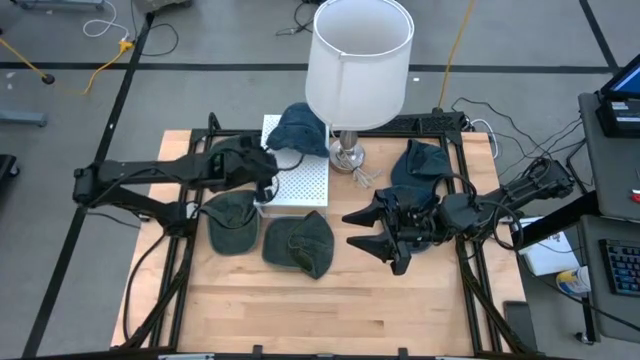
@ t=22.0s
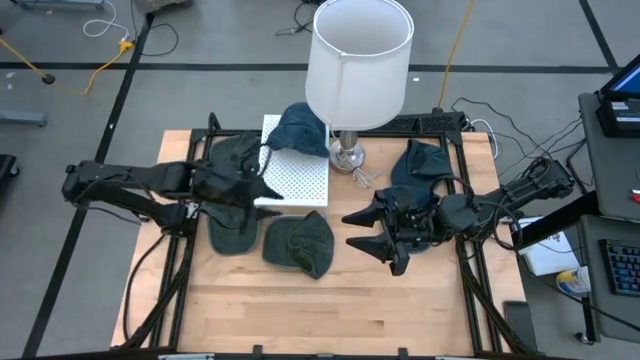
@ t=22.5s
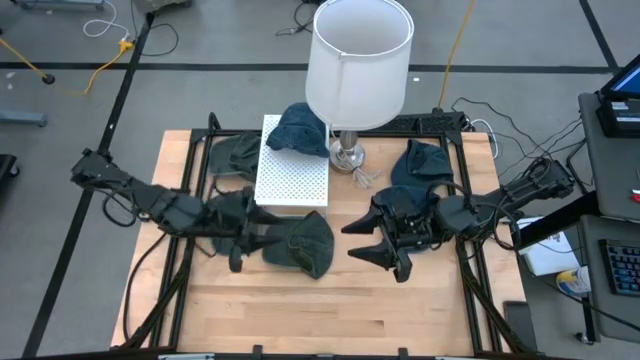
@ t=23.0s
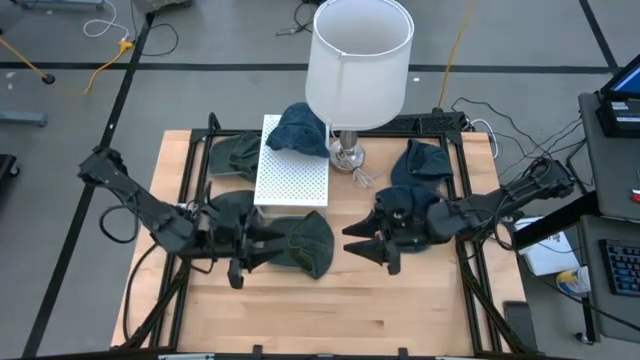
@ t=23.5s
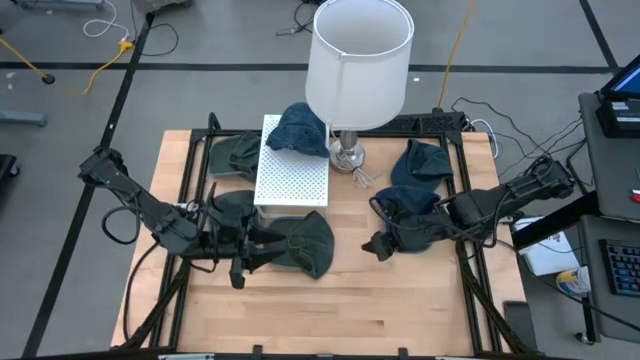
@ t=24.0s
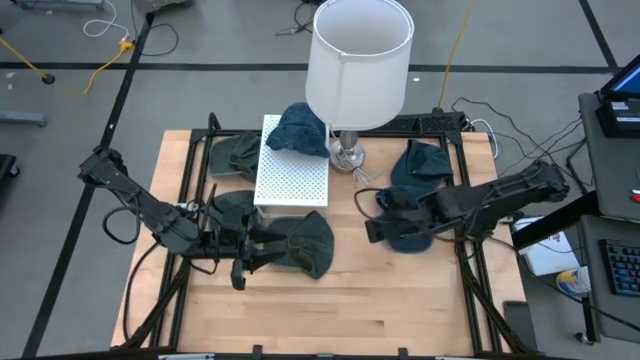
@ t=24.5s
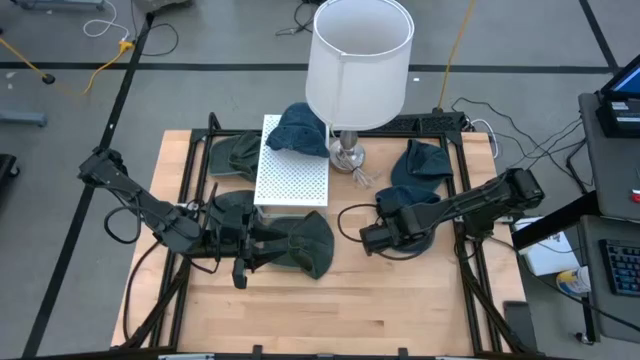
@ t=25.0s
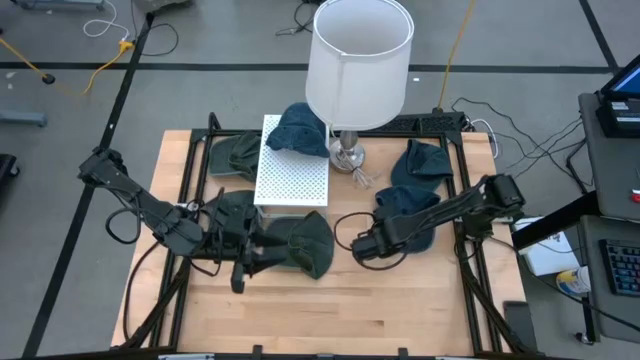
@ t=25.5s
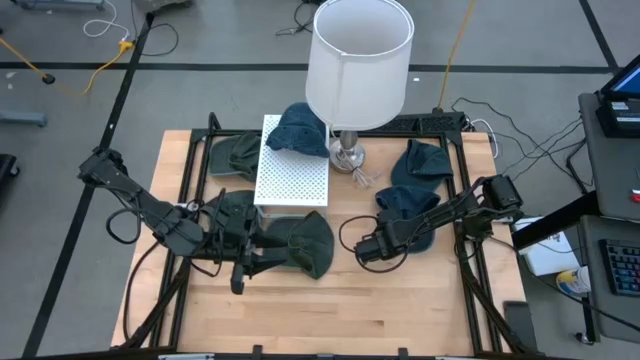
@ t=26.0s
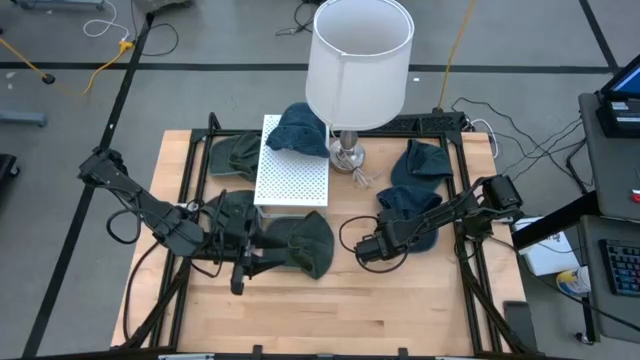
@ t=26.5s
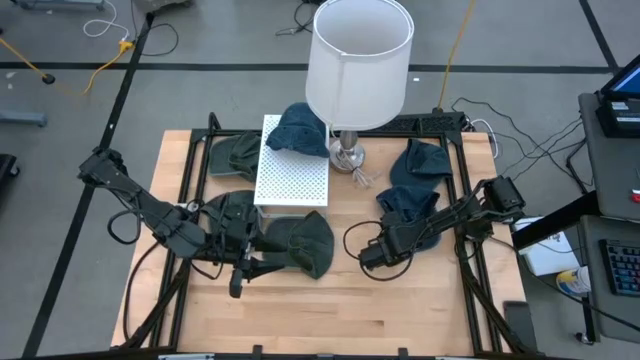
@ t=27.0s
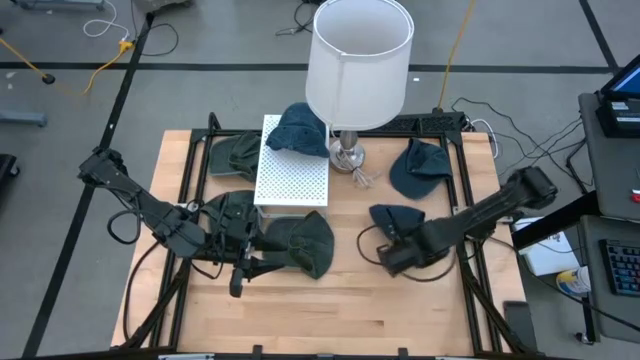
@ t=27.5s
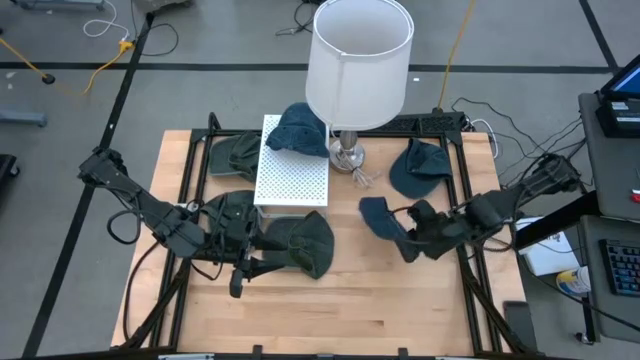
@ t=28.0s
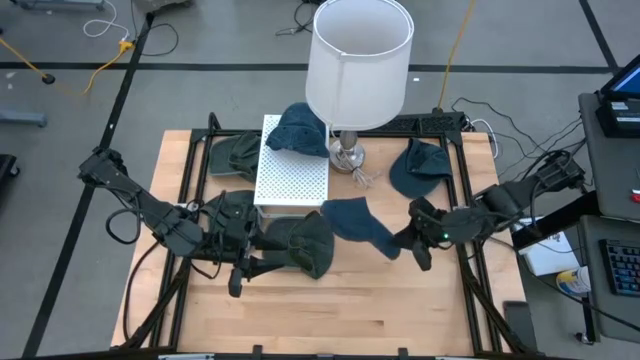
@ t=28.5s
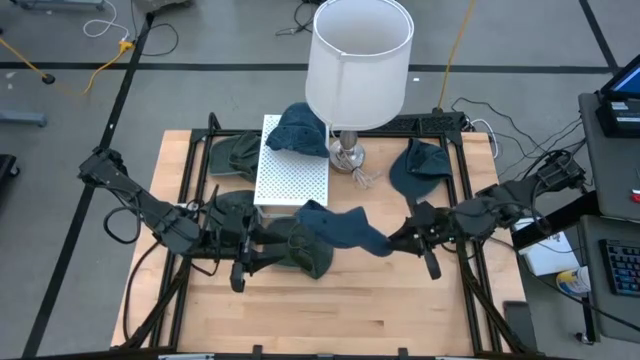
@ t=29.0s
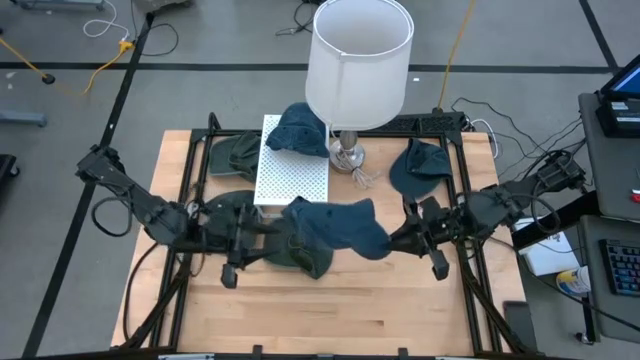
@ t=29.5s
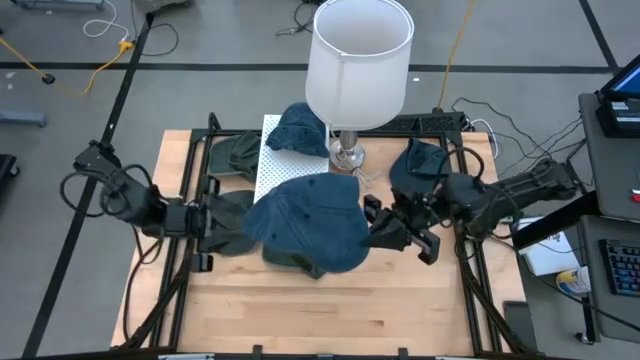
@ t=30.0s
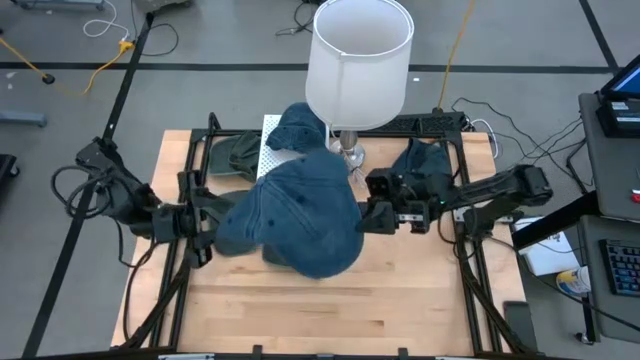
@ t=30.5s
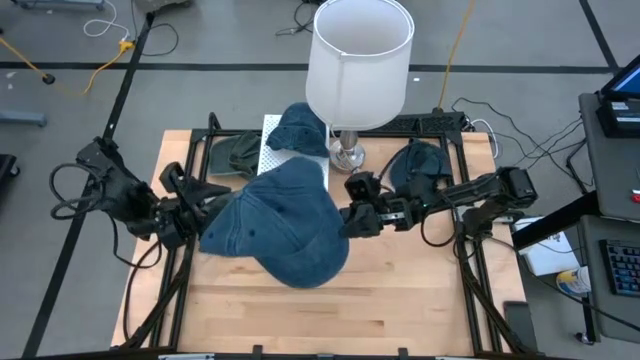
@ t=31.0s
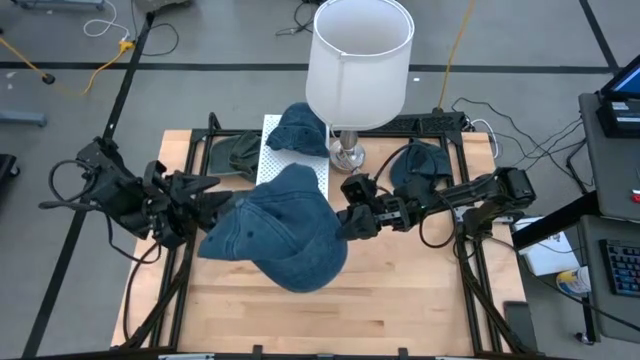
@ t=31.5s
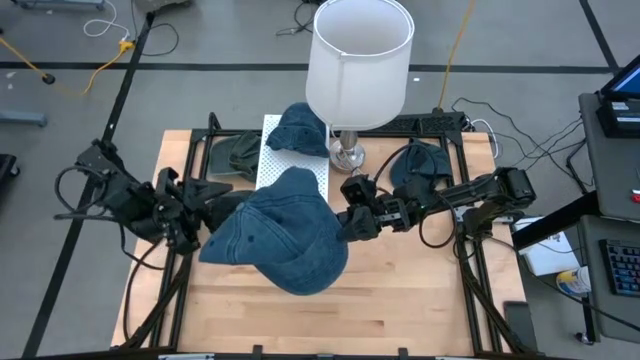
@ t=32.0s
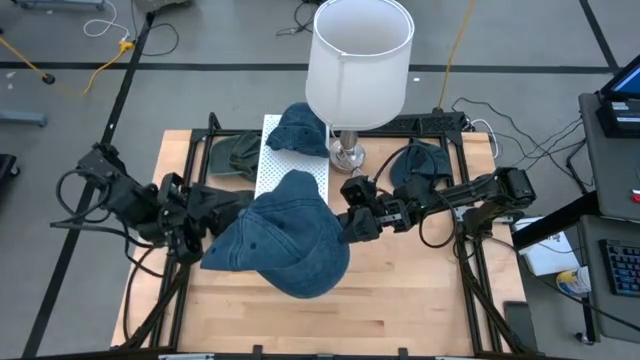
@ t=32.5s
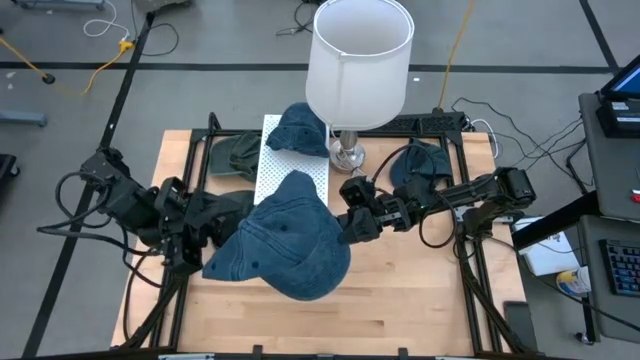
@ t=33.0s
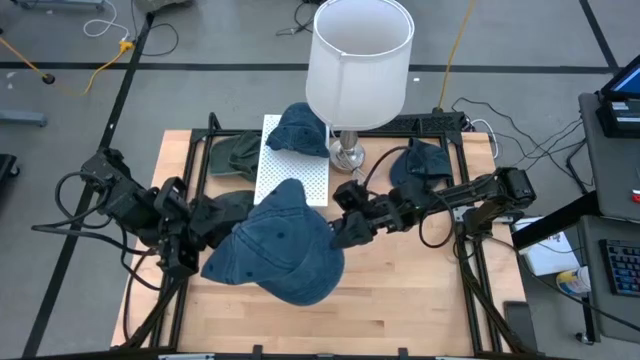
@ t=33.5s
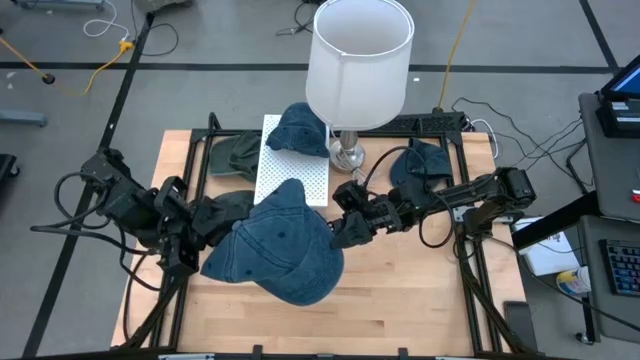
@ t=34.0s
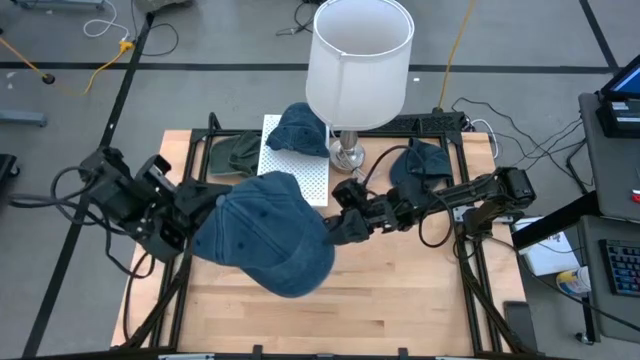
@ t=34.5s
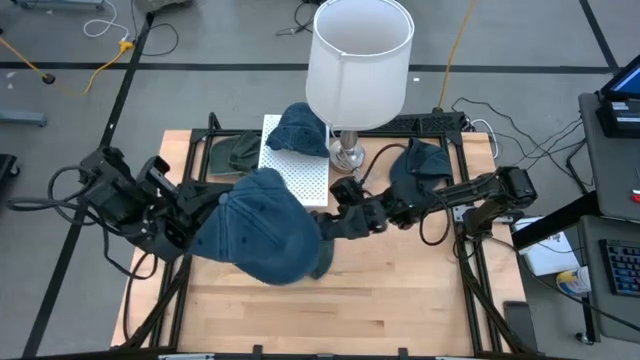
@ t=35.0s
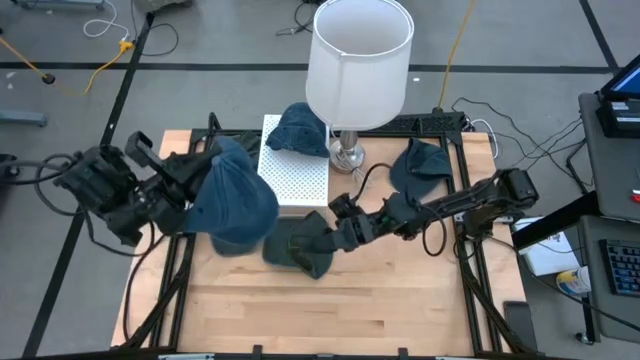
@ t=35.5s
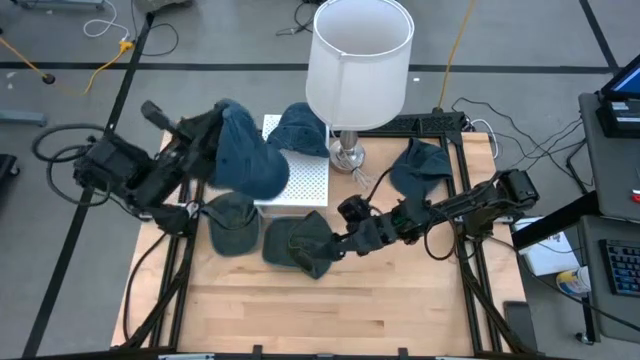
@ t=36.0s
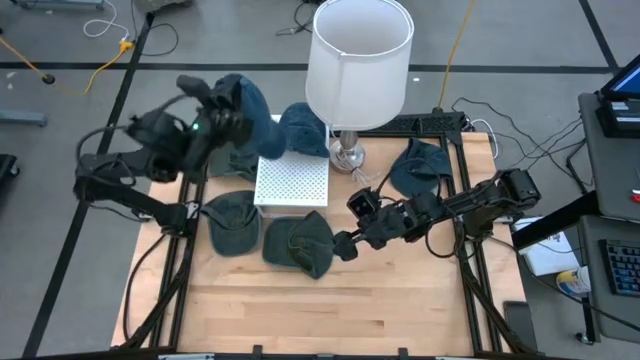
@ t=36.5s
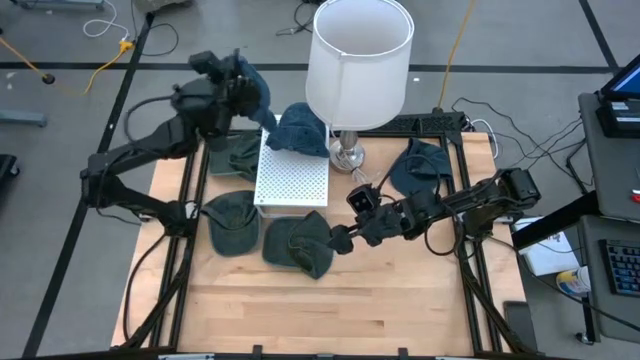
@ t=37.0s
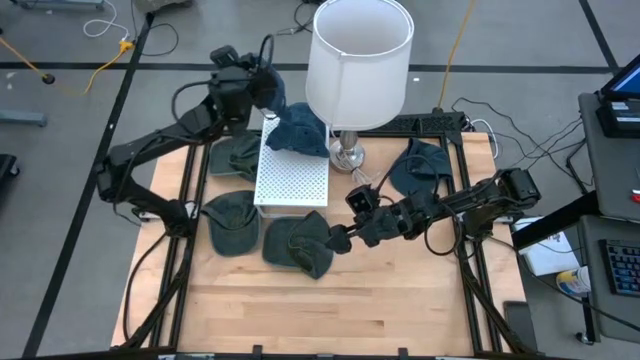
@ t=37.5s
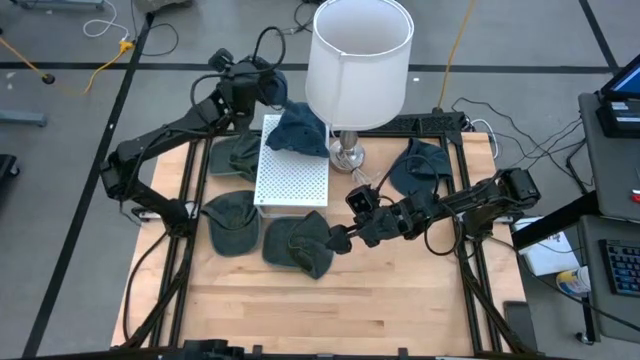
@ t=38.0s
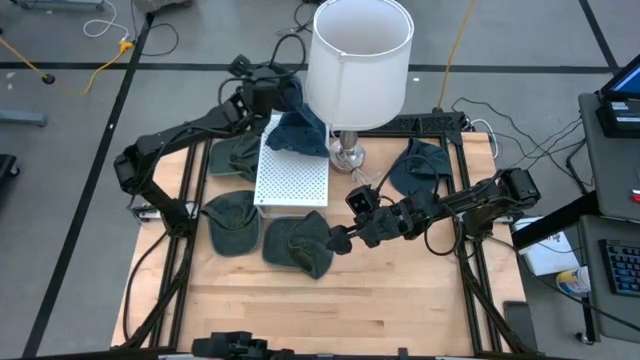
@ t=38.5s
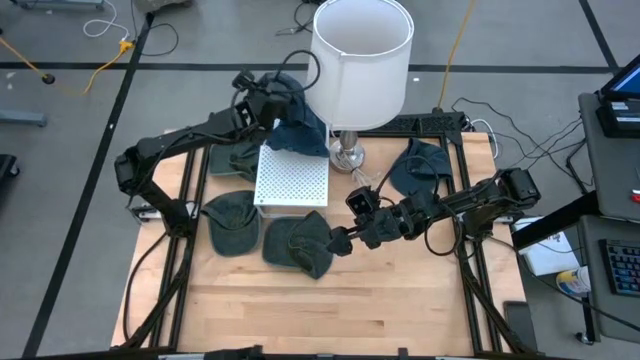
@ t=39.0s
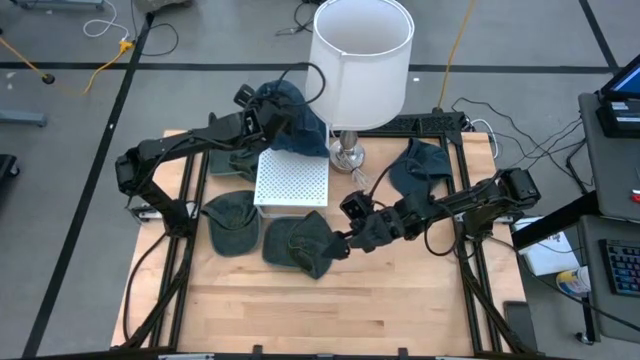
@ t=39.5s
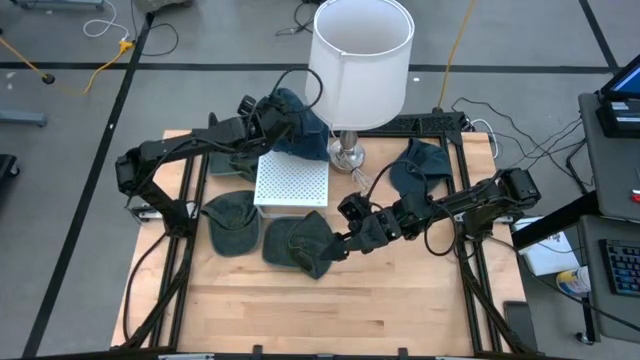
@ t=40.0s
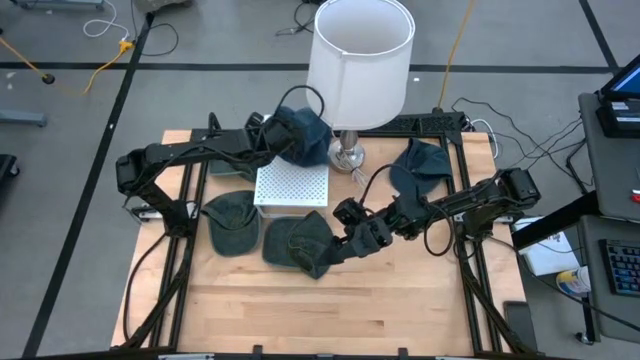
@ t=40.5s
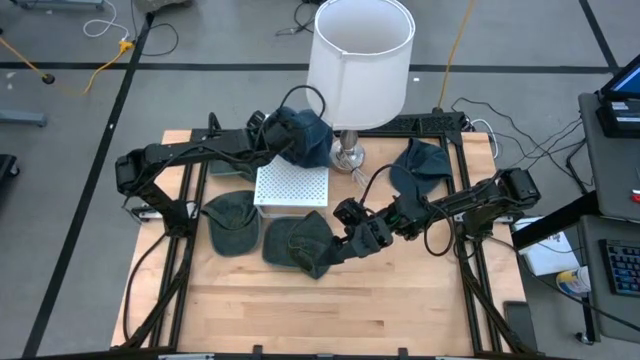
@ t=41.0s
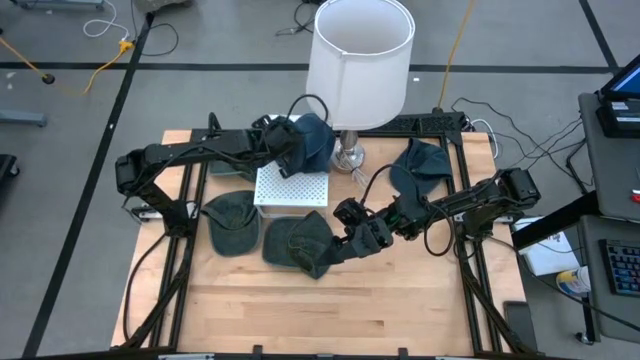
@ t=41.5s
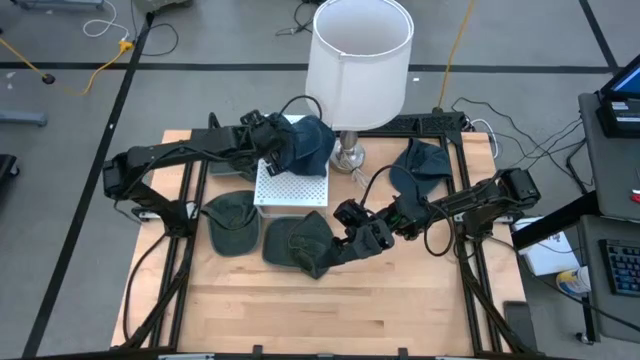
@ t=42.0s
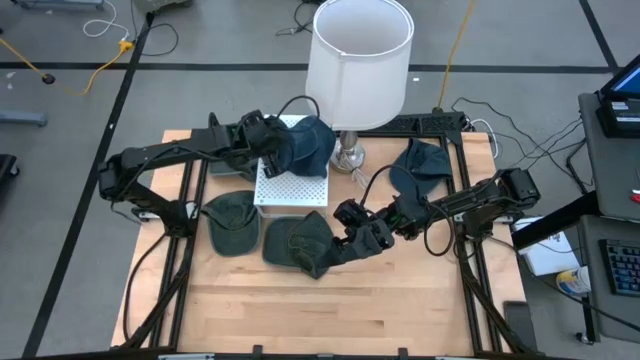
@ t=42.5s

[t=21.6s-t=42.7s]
Task: Pick & Place hat
Stack the bottom blue cap on the blue cap on the shelf
